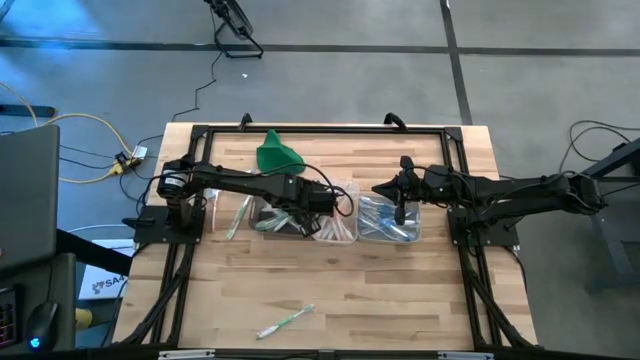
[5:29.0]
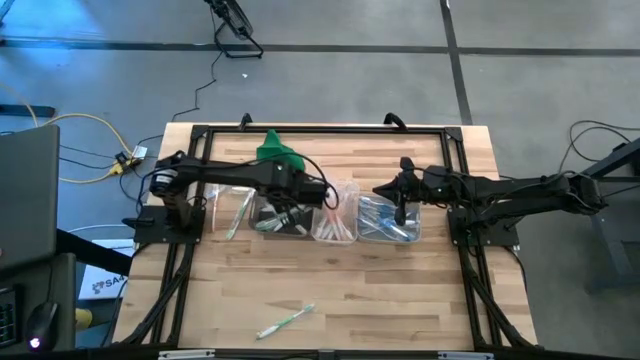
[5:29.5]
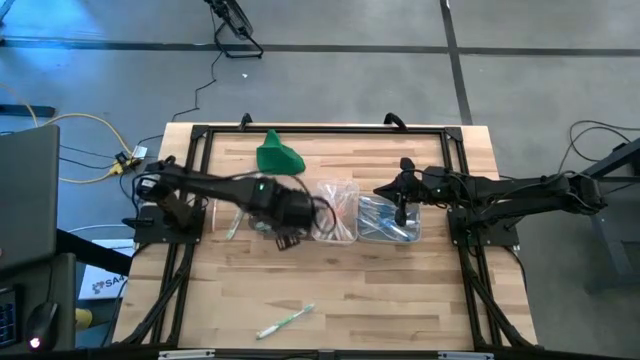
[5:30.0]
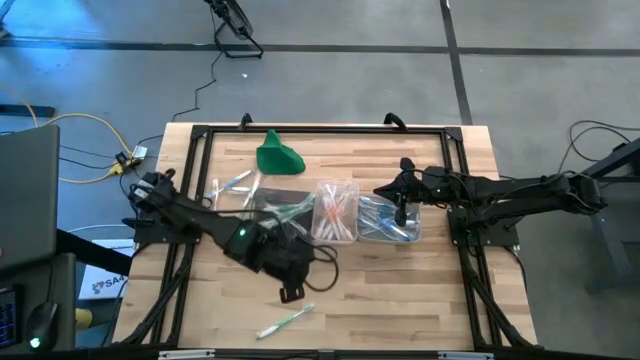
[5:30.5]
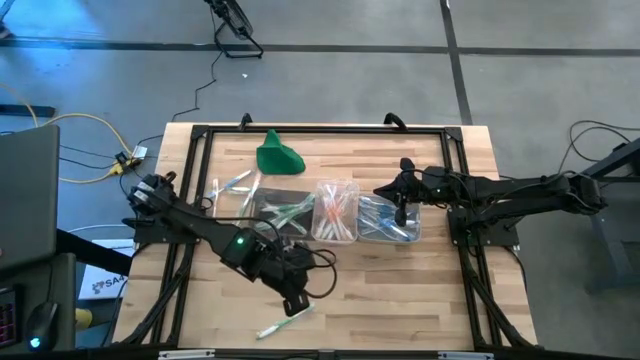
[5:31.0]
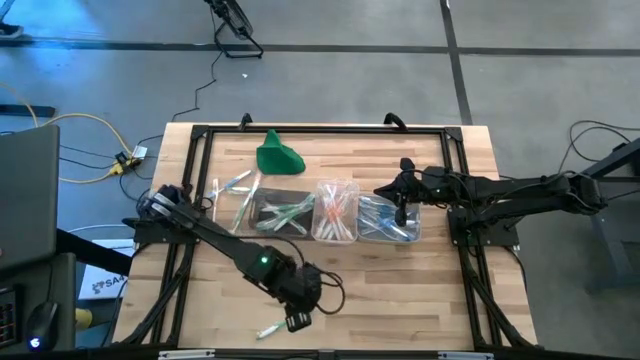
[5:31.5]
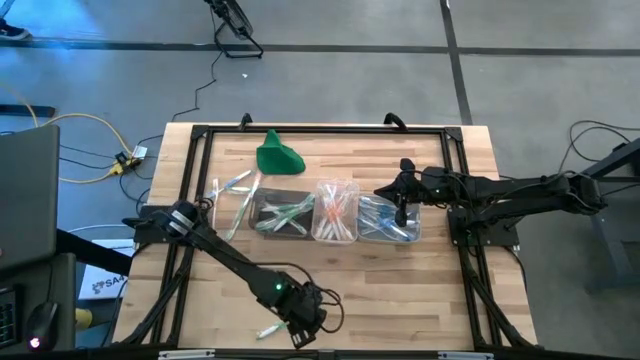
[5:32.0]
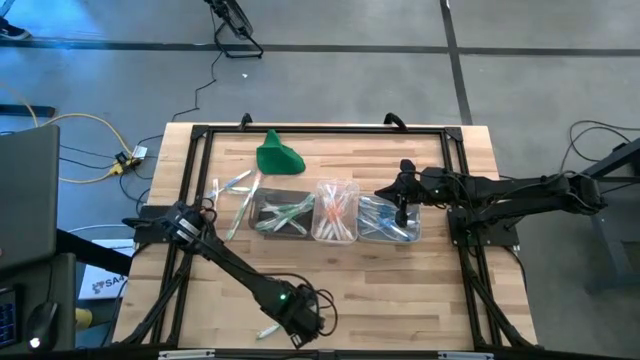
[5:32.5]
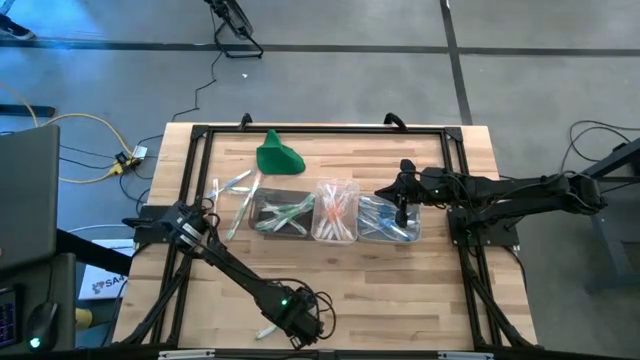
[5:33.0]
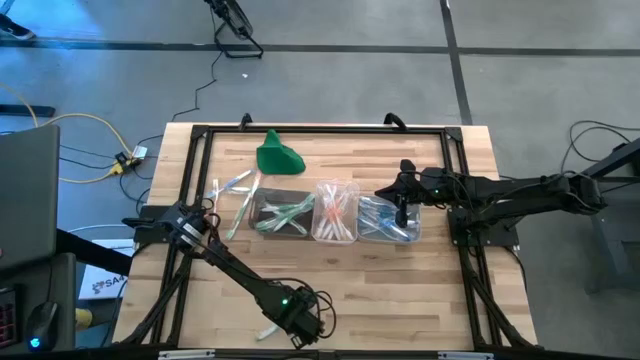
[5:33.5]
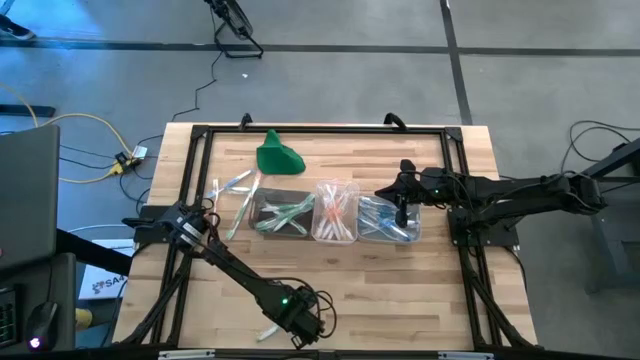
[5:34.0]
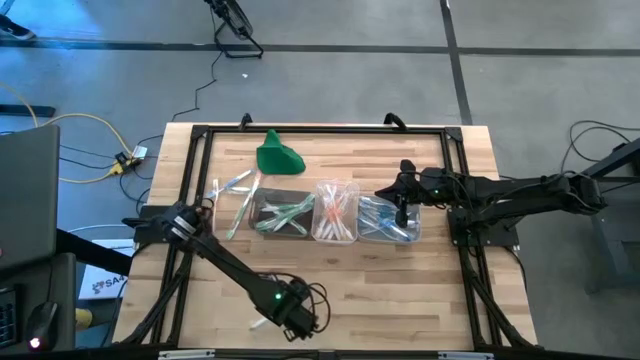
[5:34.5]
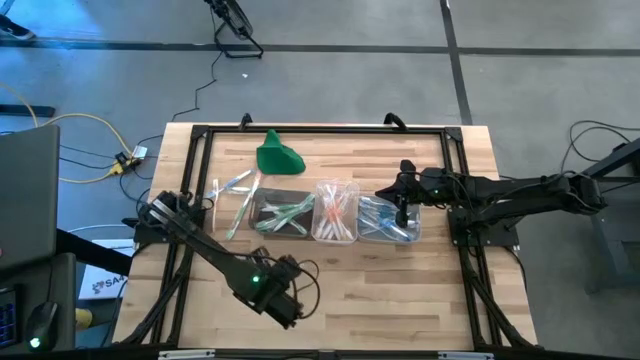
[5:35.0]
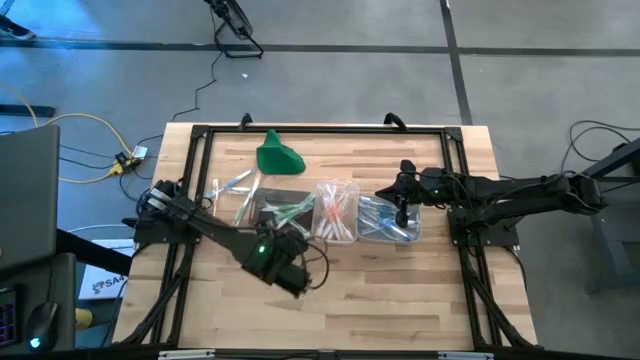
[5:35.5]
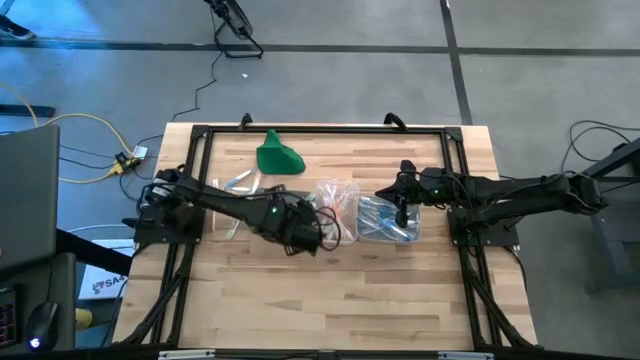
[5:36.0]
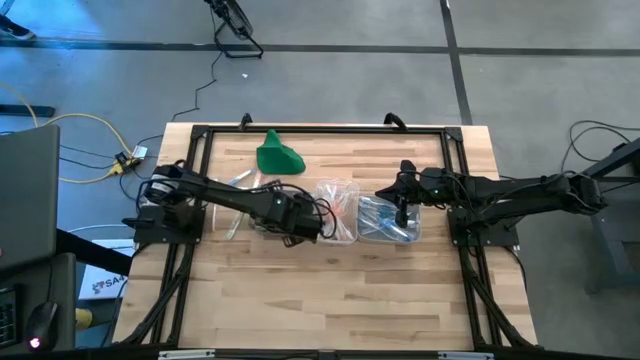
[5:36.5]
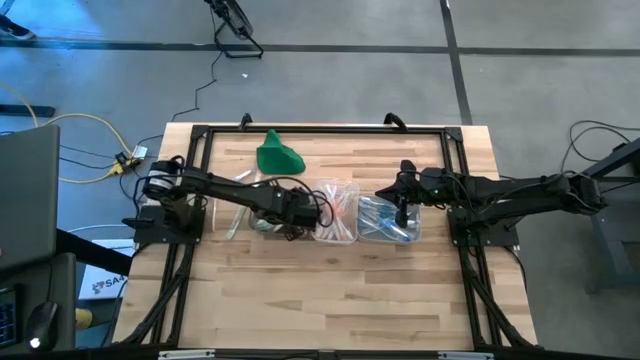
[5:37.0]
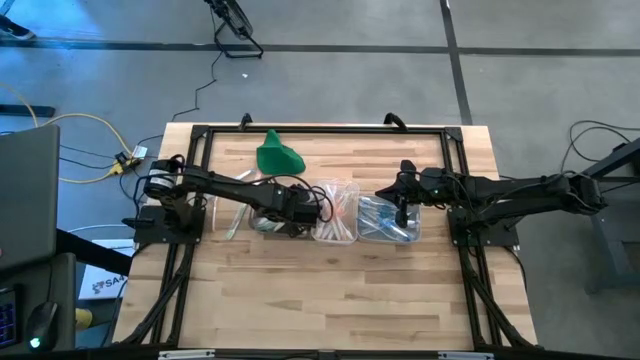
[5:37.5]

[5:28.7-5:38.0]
Task: Pick & Place Toothbrushes
Put the green toothbrush into the black bin

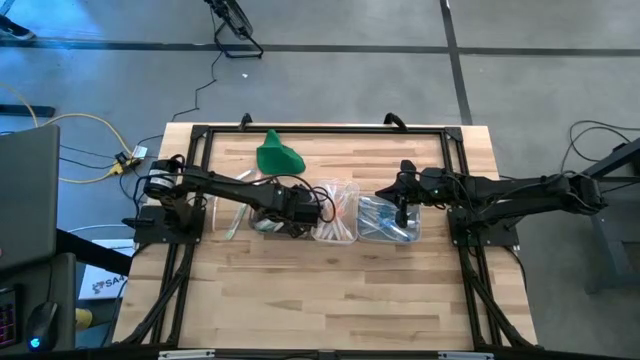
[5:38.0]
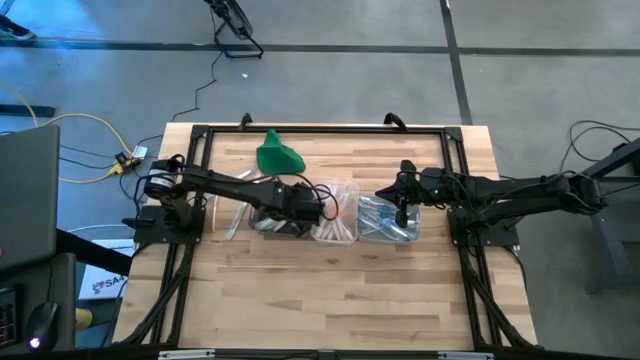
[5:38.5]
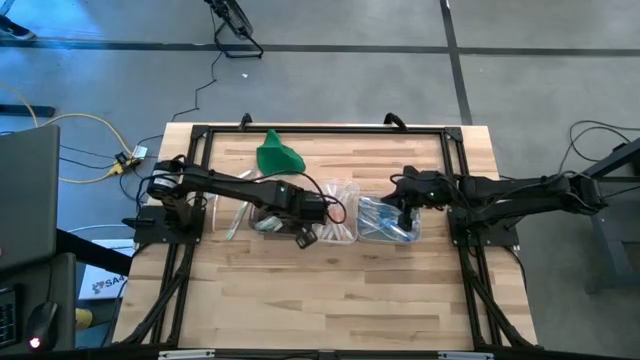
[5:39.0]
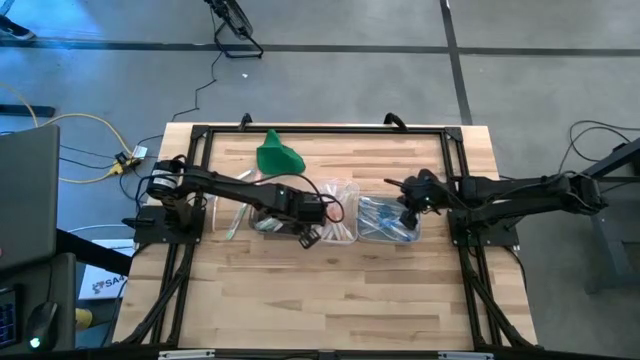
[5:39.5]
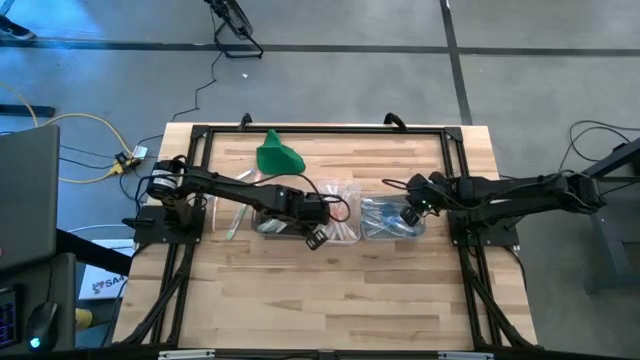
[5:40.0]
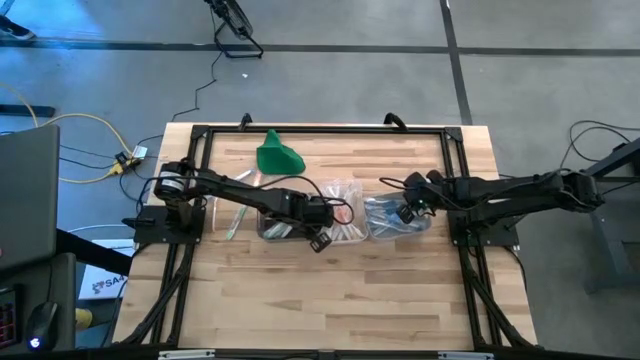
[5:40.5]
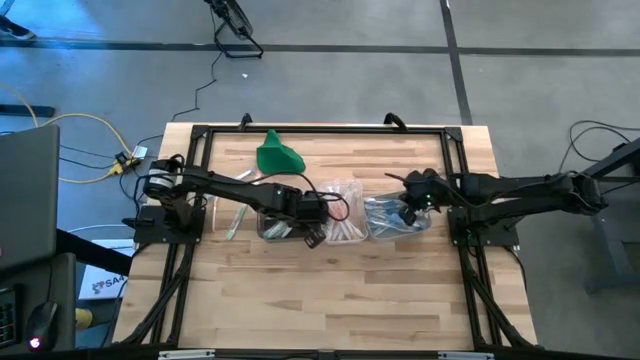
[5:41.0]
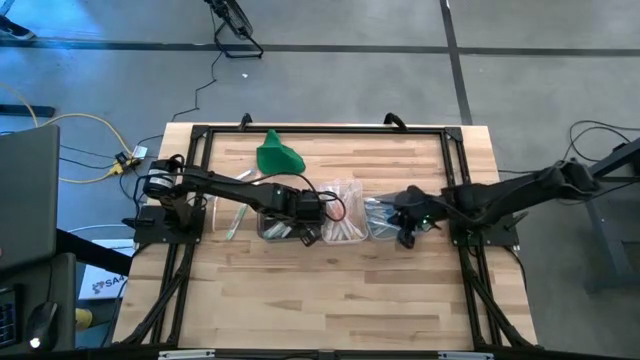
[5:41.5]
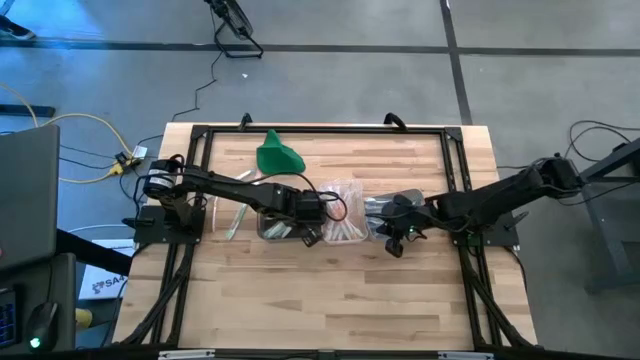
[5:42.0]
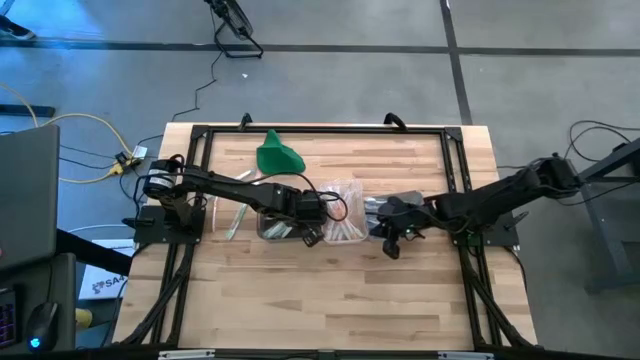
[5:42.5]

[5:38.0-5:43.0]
Adjust the bins on the table

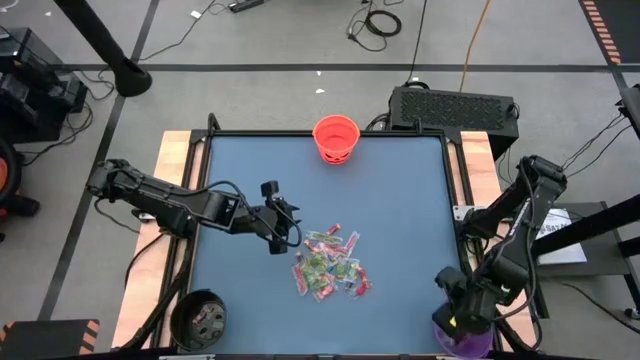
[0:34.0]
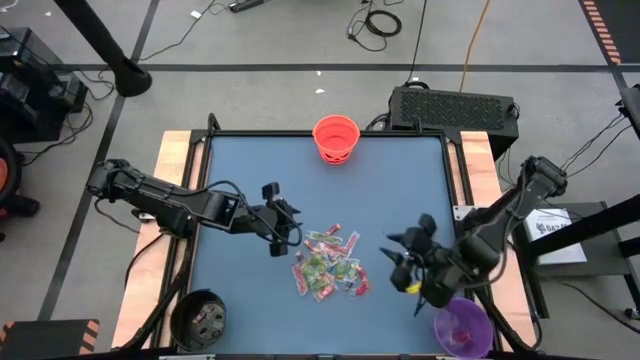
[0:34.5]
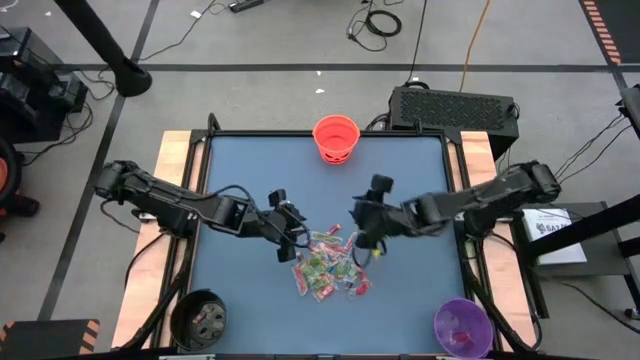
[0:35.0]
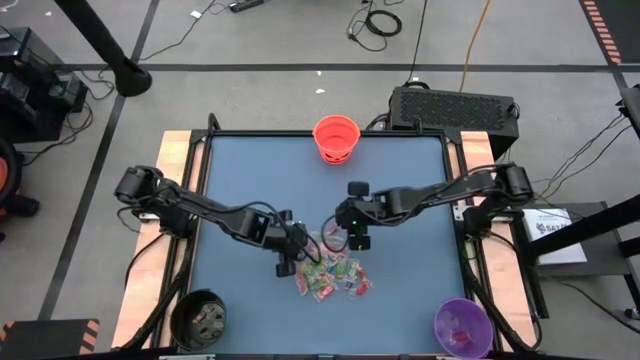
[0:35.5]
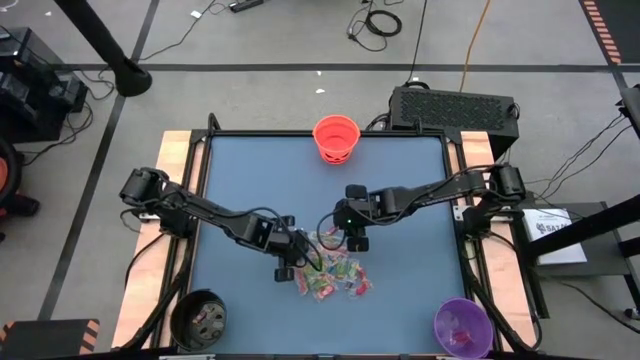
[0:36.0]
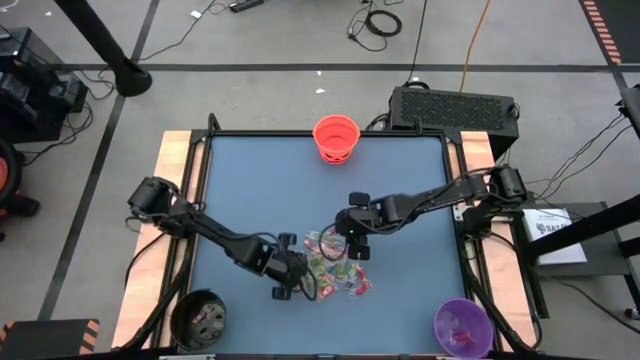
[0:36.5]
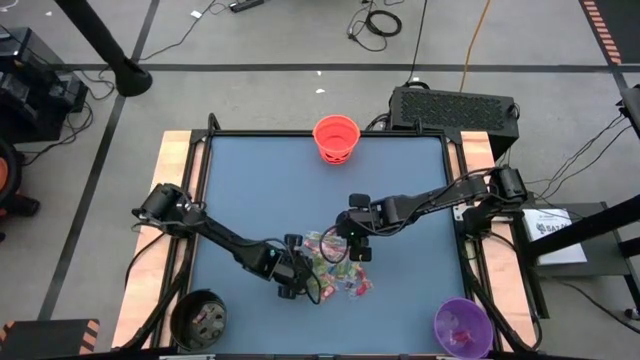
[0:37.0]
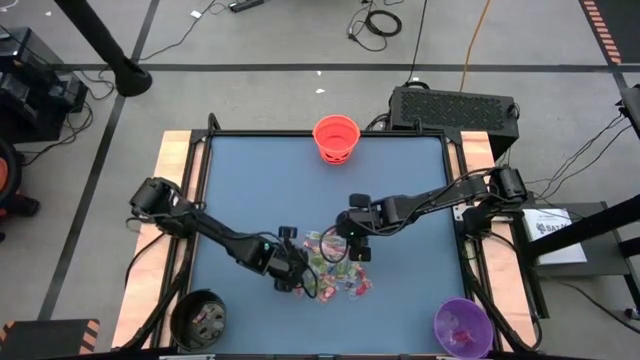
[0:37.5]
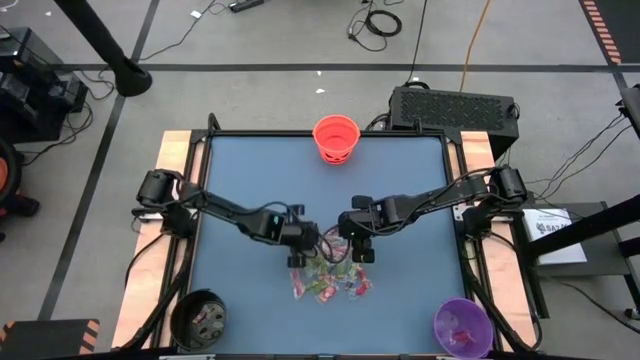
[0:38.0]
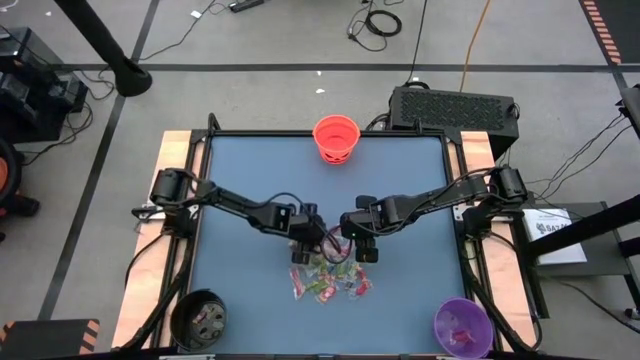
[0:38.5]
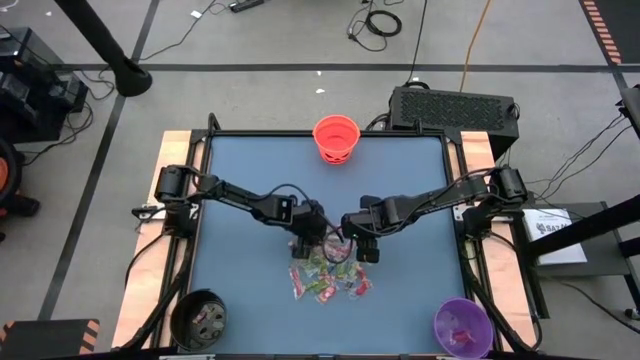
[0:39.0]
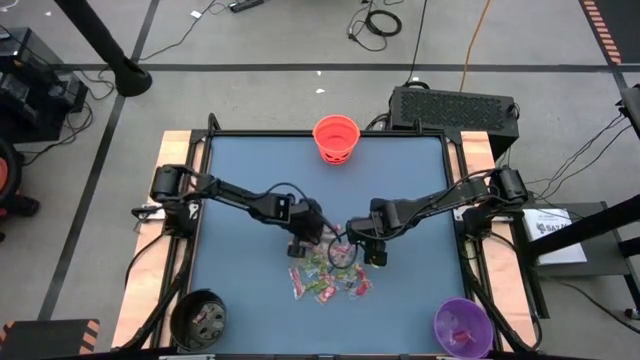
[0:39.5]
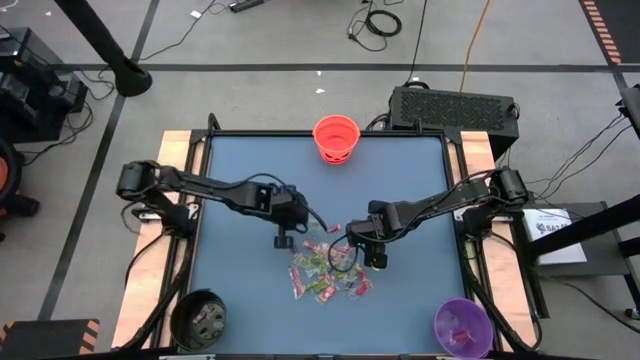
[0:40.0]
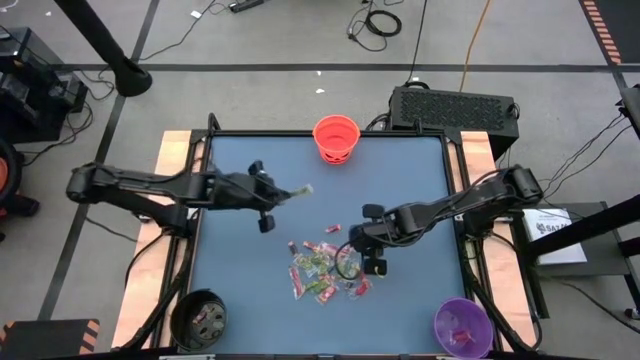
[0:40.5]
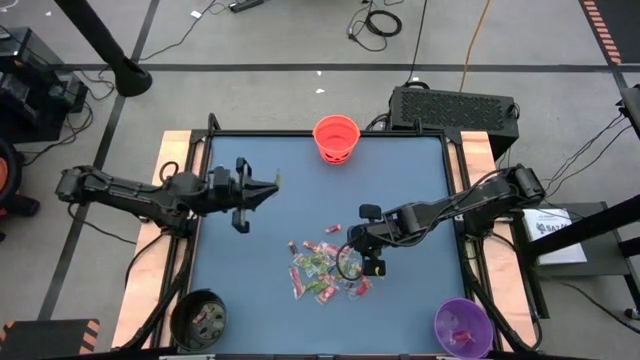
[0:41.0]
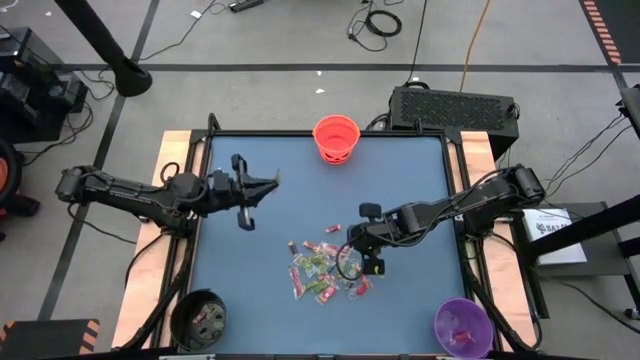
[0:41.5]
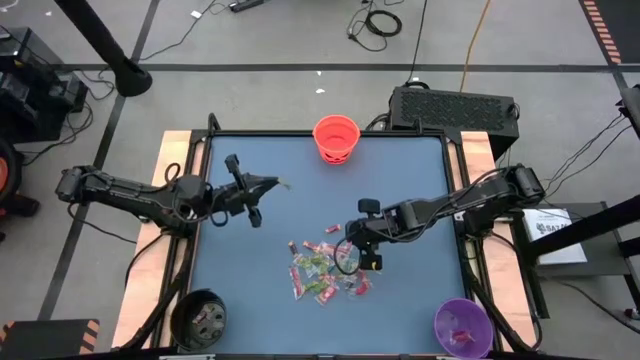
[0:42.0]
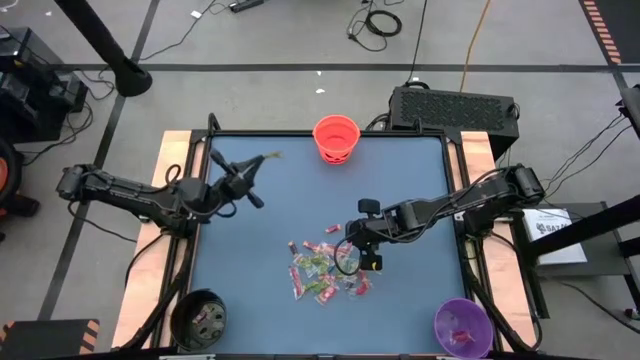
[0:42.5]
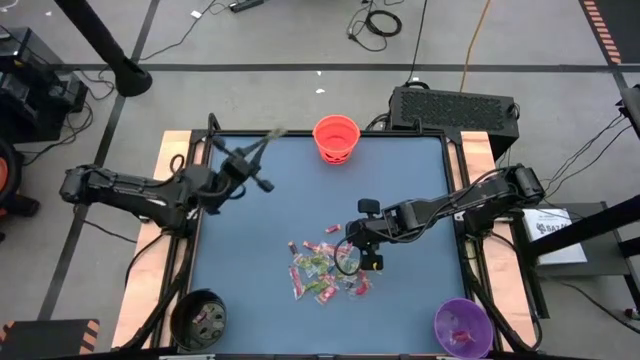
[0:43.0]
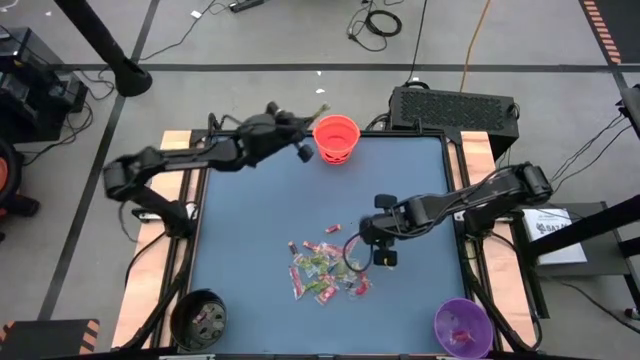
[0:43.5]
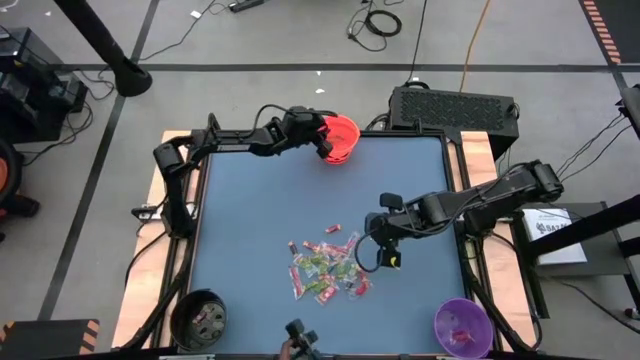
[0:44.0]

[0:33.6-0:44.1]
Task: Sort candy by brand, put in halloween buckets
Put the long green gummy into the orange bucket
